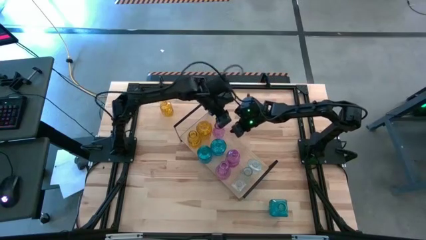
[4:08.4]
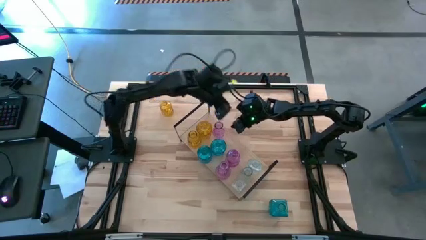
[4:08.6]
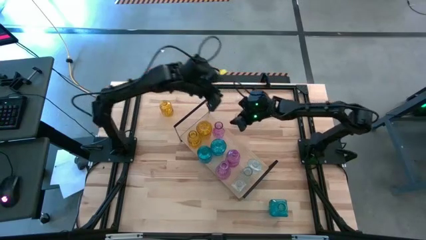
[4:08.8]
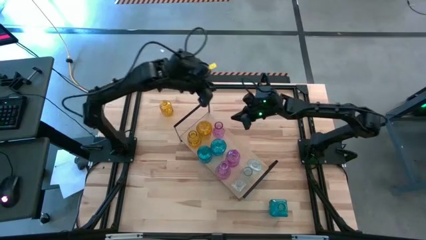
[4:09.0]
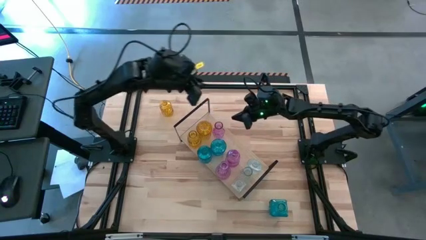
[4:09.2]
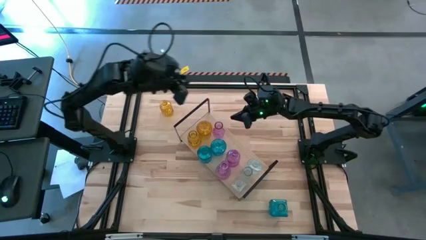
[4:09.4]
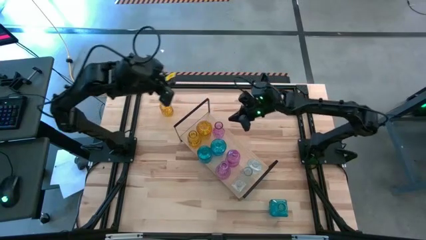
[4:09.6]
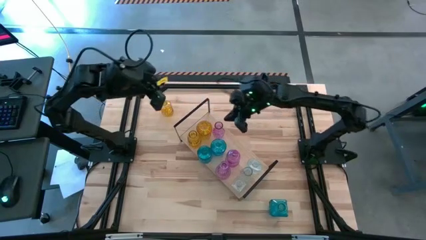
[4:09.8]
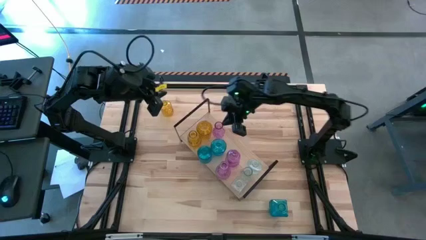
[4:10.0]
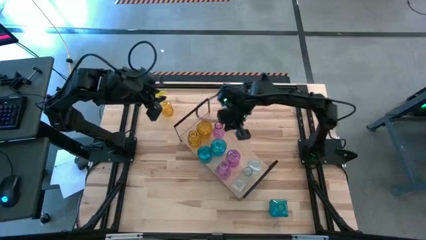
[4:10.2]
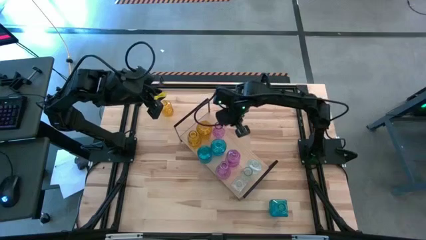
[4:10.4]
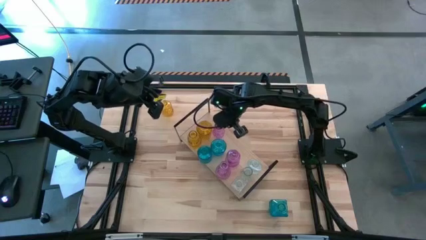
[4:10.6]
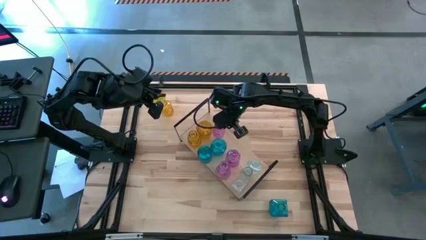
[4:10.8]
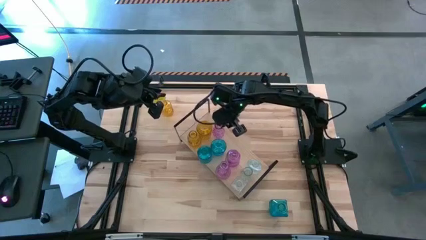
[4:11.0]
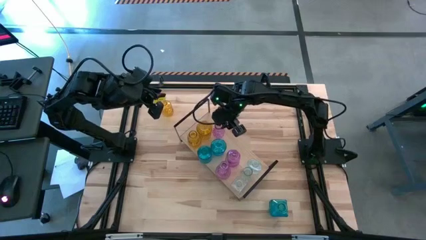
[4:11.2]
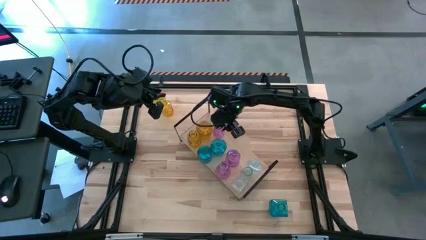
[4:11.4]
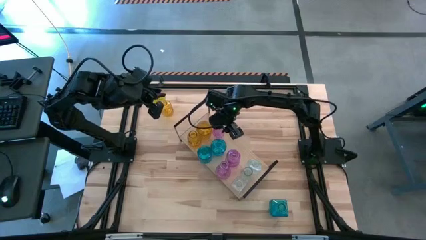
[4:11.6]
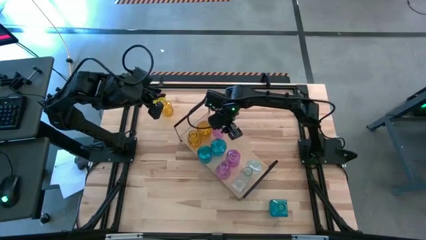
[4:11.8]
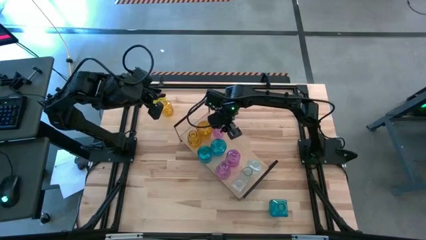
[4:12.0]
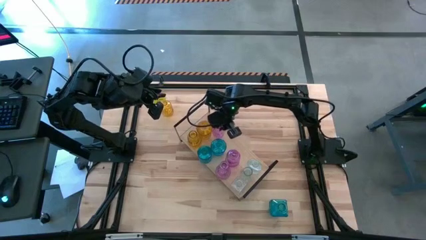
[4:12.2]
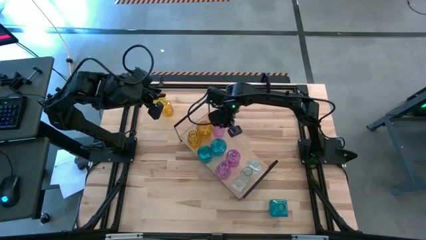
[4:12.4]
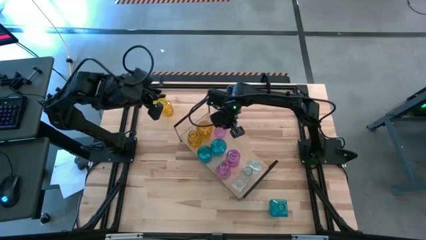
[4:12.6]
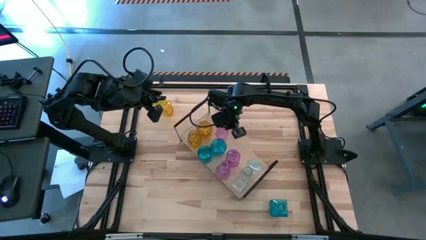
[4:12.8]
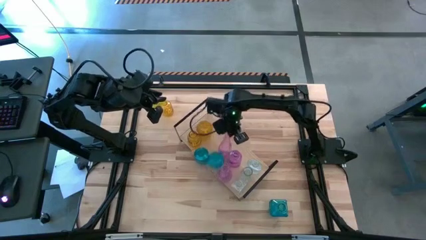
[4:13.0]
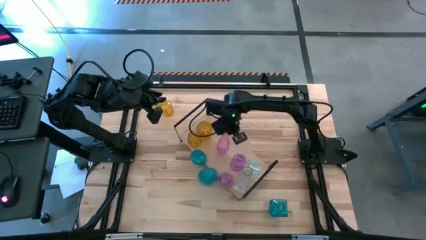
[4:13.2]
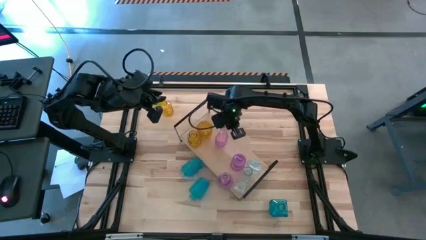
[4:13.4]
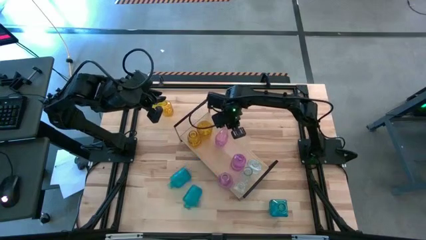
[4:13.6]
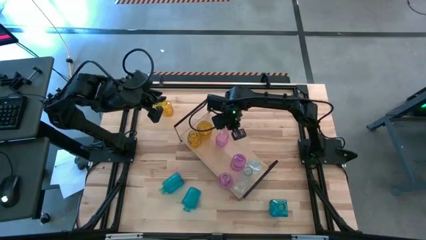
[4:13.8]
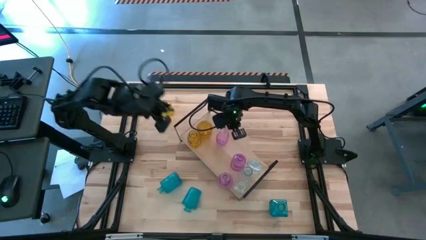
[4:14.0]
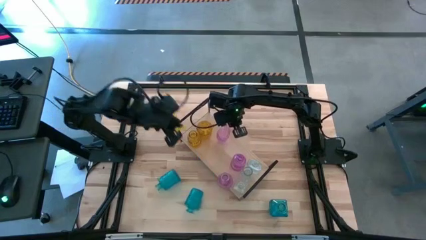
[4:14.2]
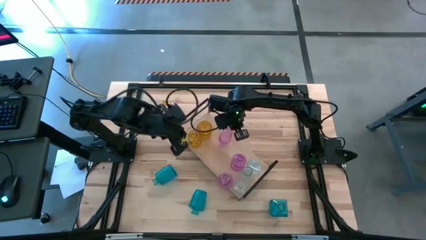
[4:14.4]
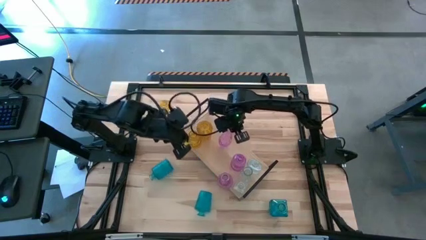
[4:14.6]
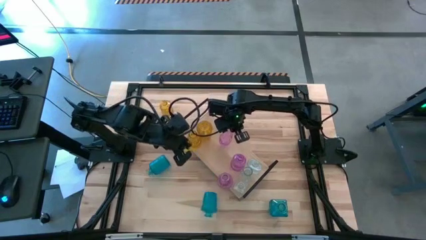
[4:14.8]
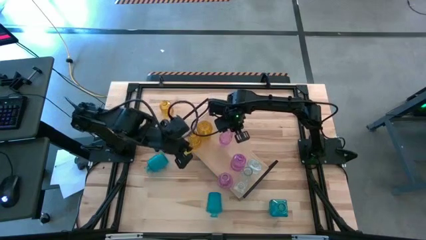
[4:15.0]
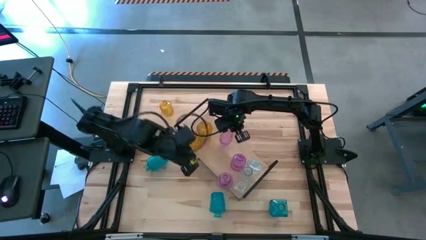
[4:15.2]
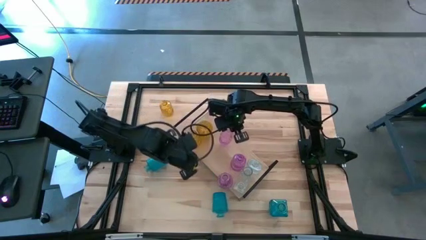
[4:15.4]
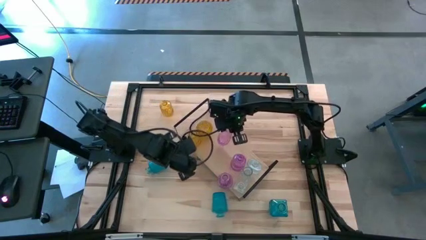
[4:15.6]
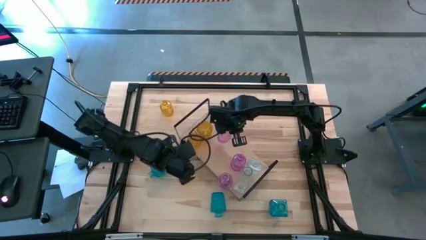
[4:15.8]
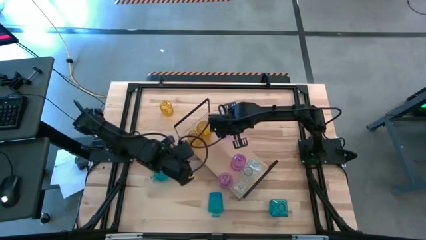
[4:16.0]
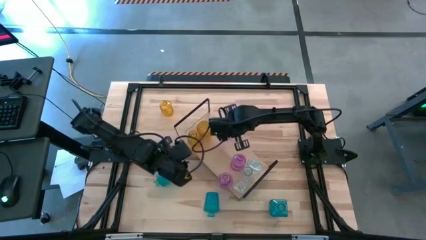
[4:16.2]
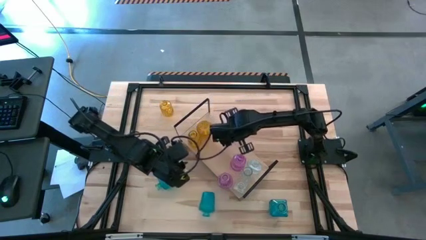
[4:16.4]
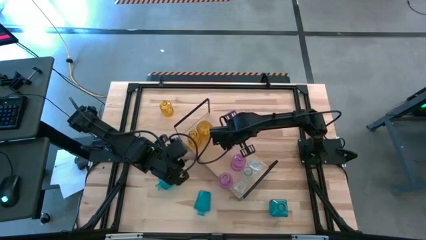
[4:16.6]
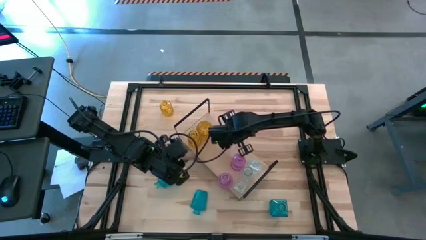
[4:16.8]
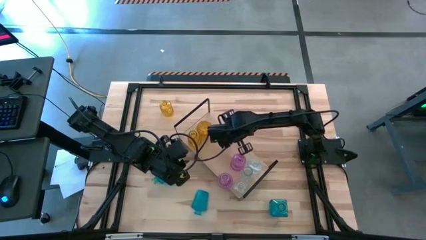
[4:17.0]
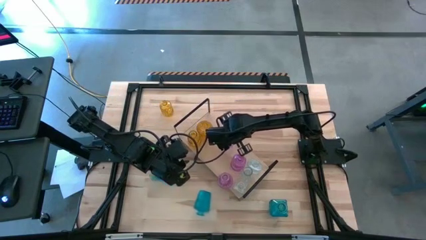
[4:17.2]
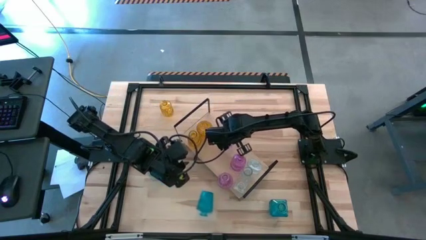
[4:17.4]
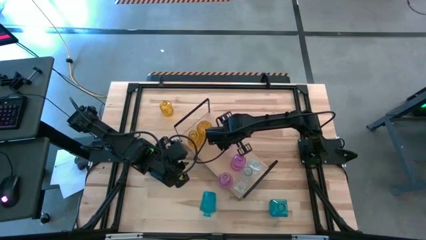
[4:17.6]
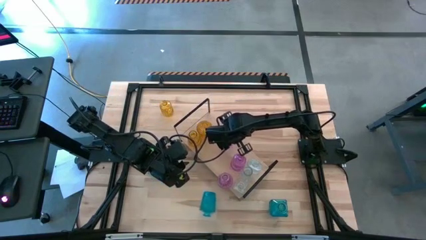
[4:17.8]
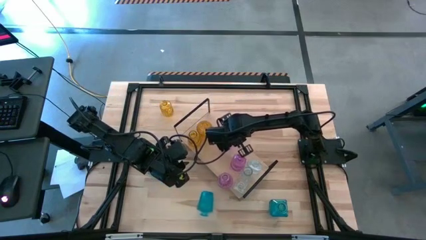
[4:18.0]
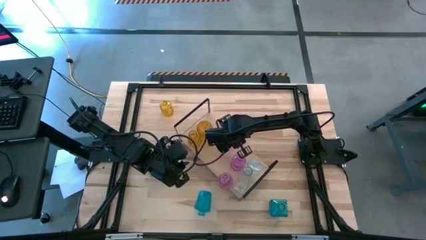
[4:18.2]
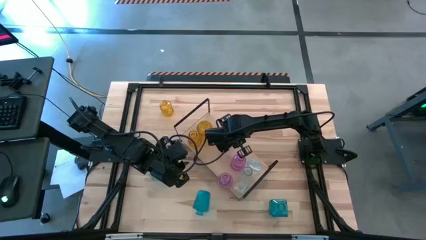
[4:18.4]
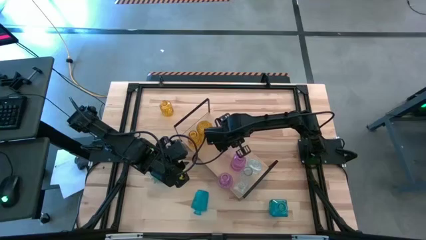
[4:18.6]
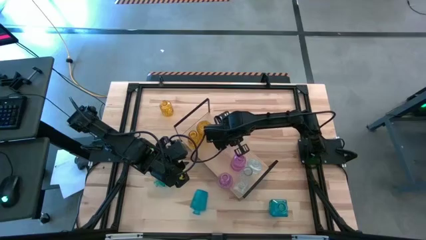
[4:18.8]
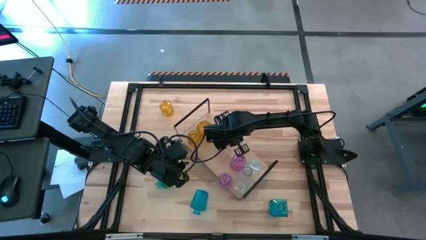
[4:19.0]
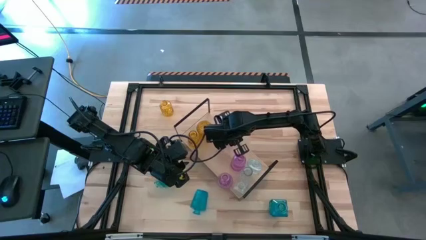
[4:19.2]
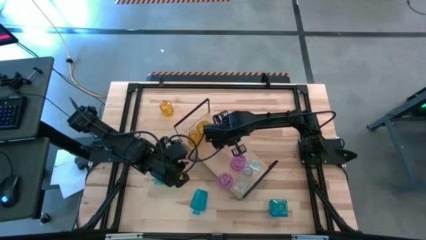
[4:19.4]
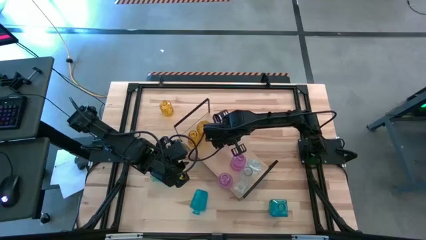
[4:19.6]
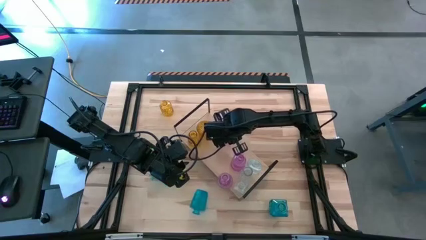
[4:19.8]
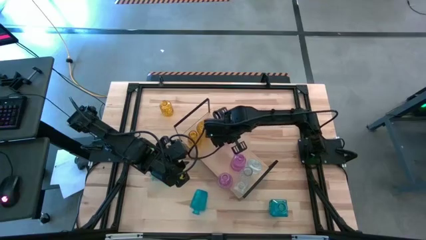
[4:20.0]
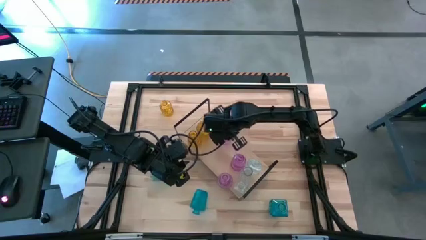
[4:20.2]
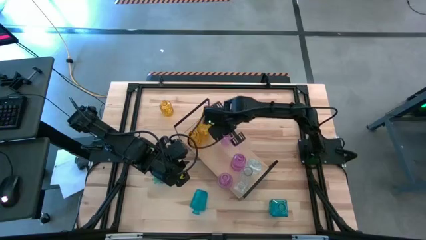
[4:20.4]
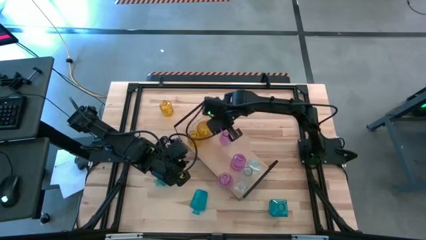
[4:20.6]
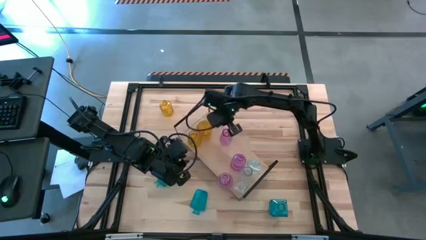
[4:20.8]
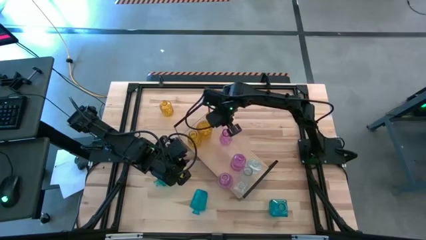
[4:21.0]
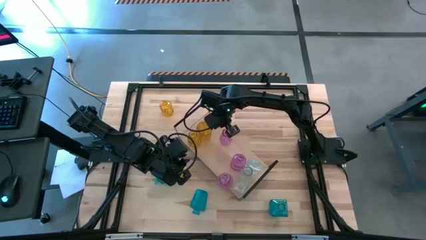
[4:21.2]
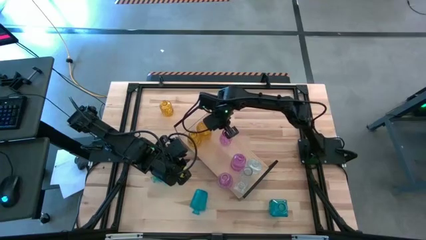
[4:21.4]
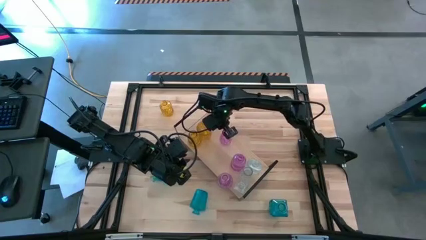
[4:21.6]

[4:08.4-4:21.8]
Task: sort vases onto shelf
Adjust the pink crystal vases
